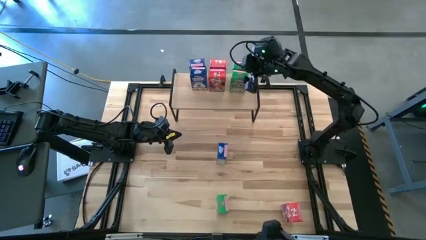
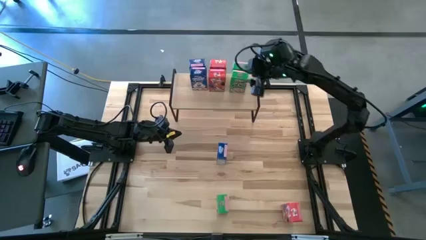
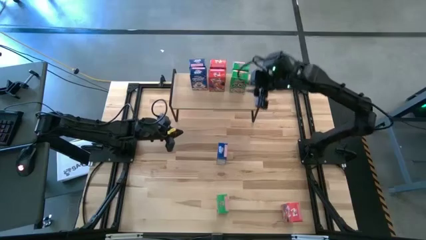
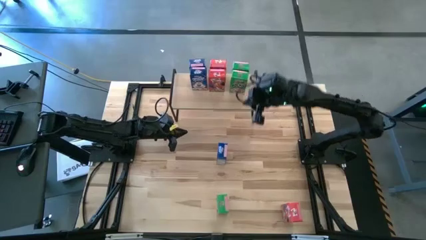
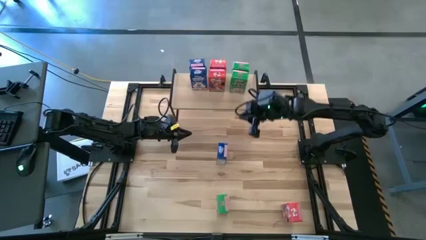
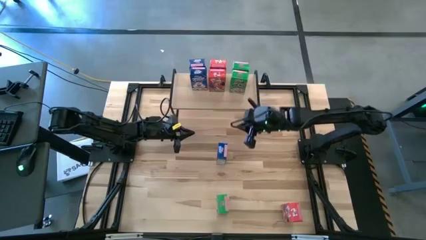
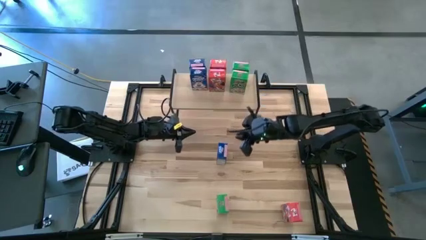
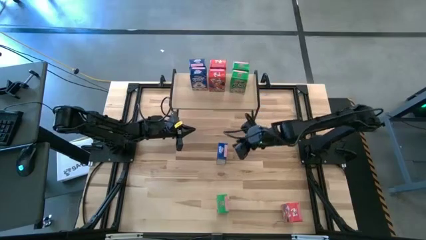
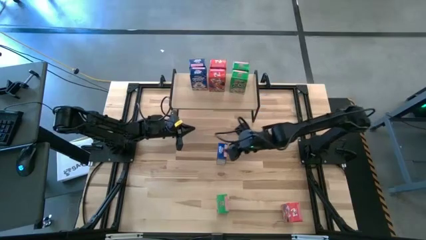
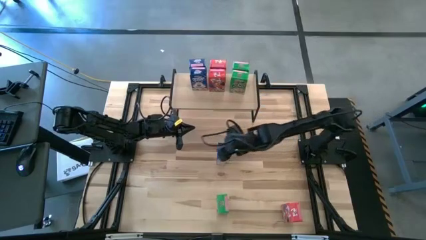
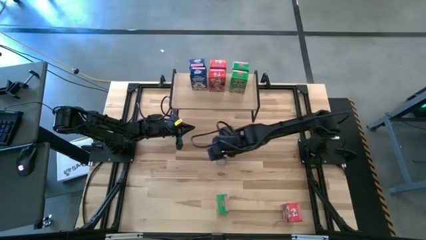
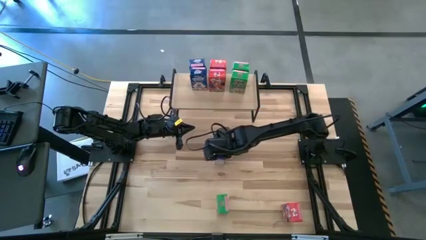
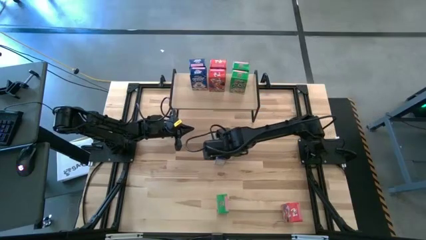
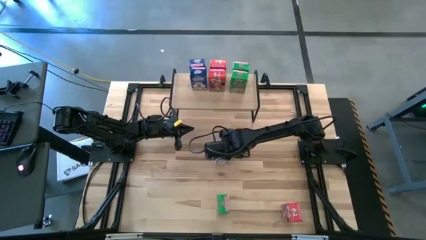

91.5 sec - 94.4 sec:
Task: Stack cereal on shelf
Put the blue cereal box aligned with the other blue cereal box on the shelf

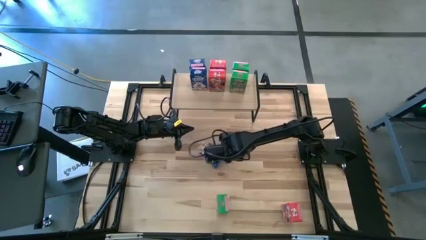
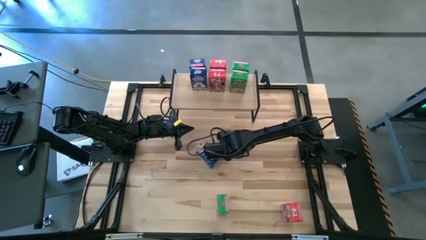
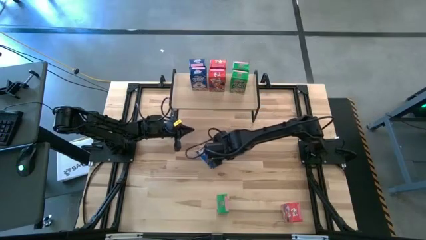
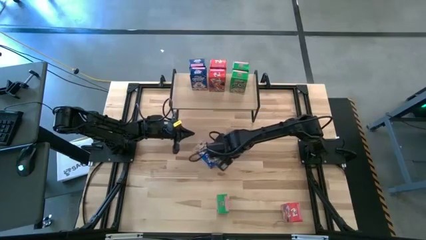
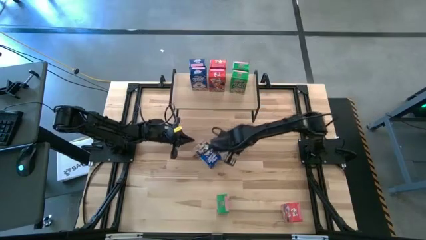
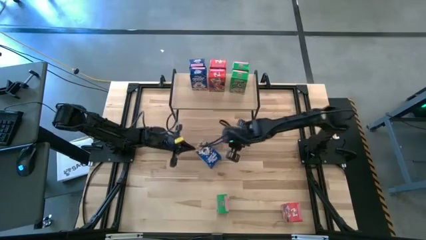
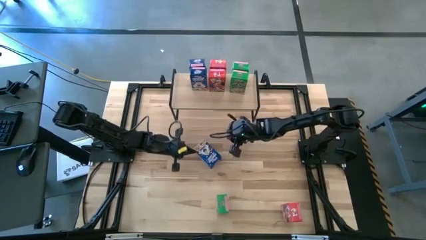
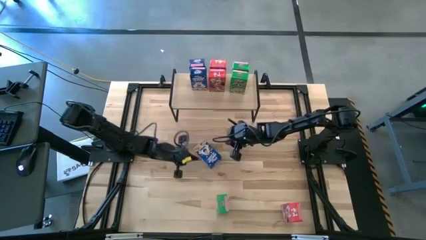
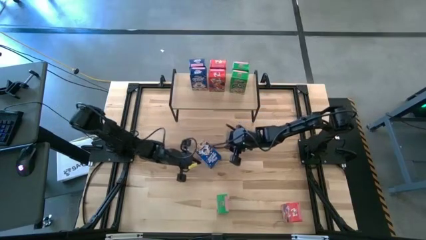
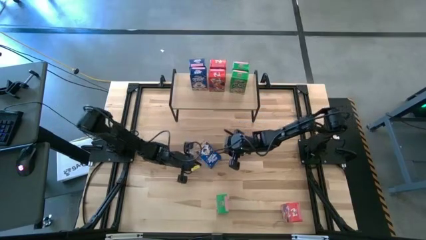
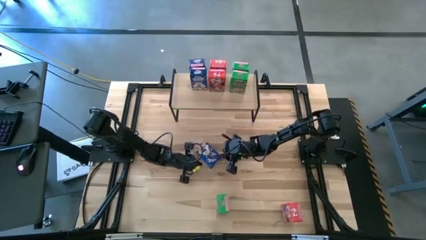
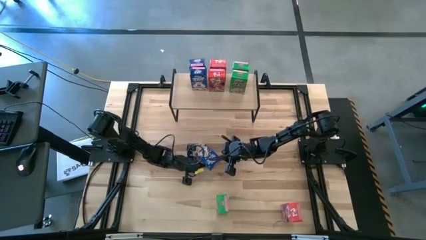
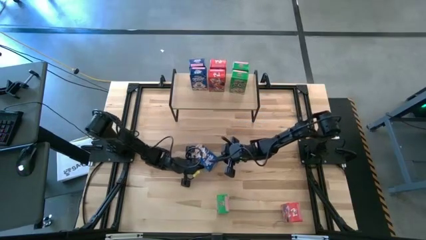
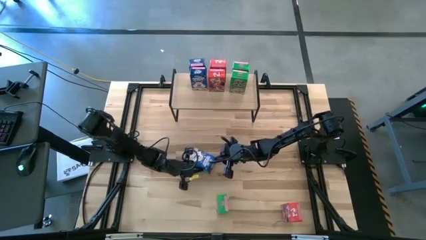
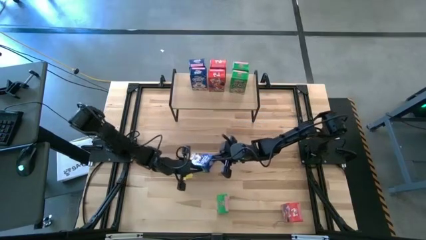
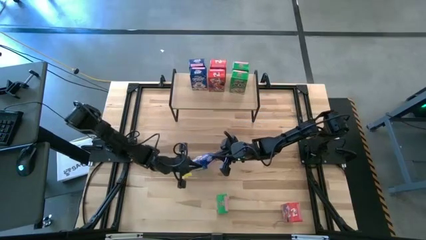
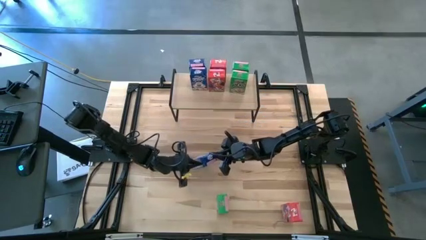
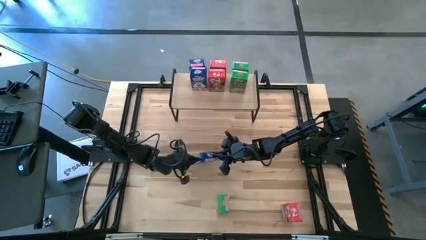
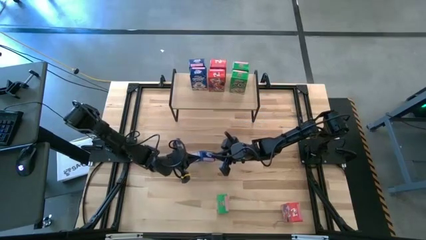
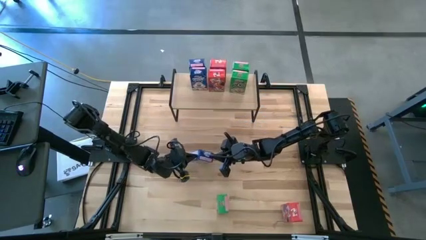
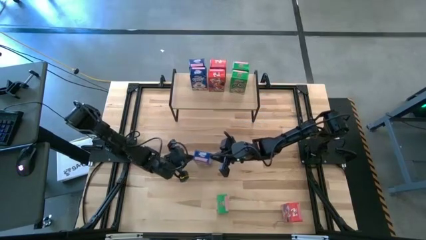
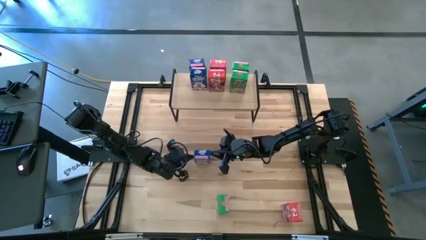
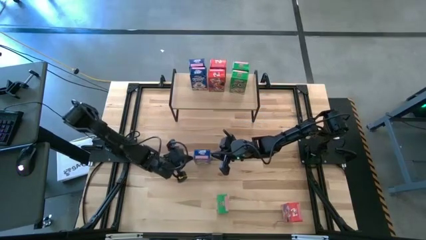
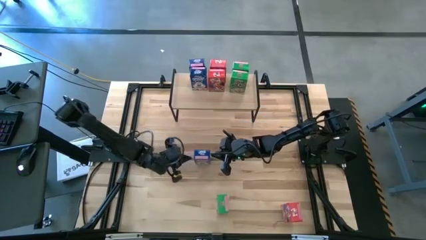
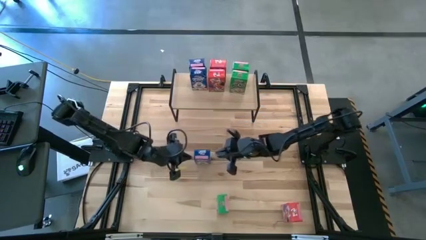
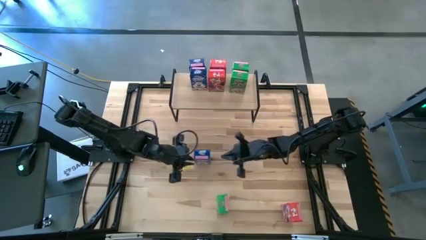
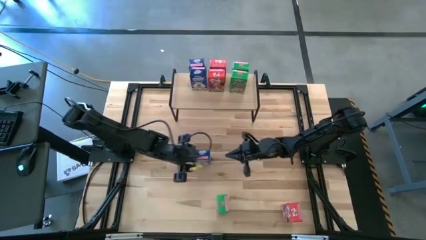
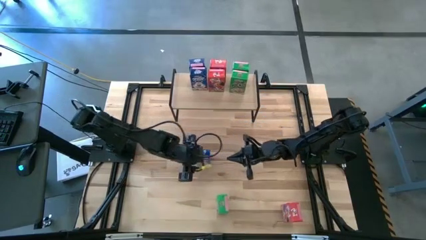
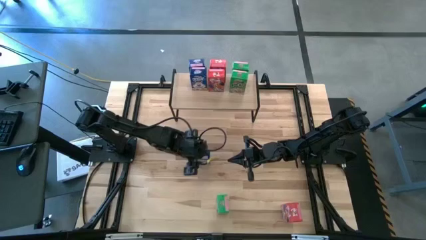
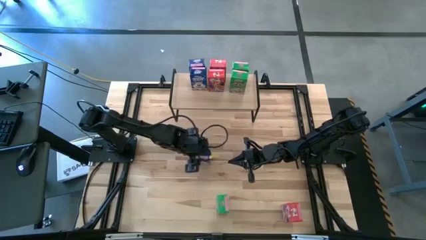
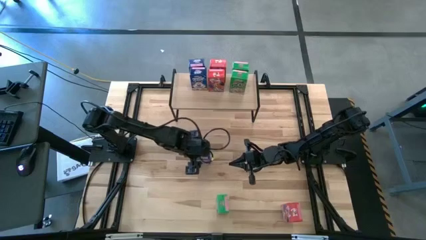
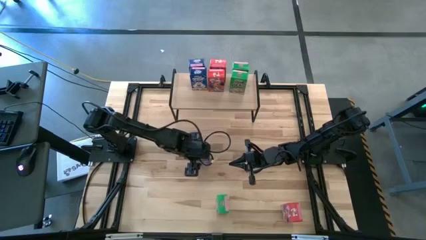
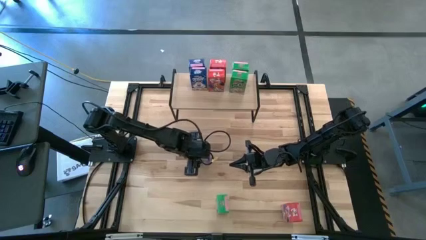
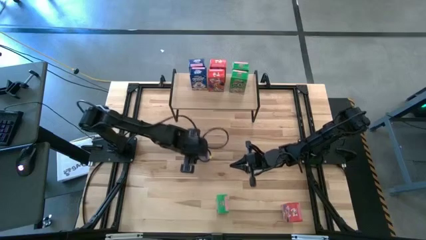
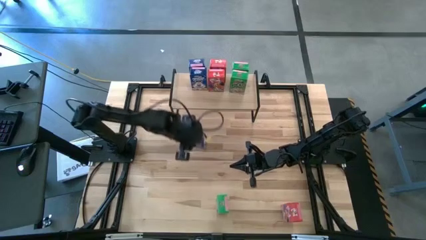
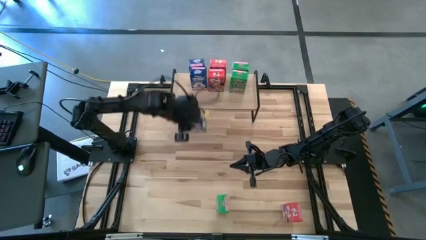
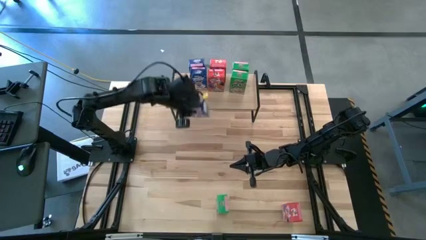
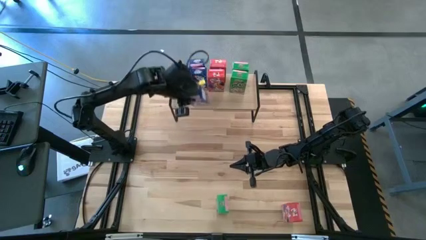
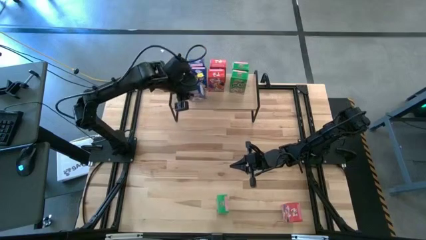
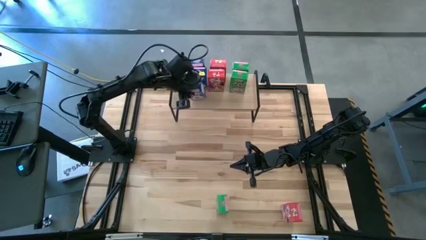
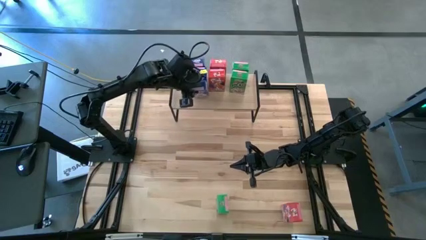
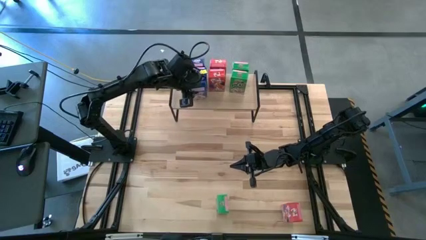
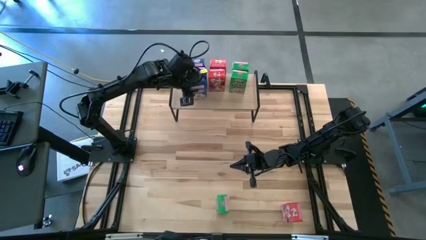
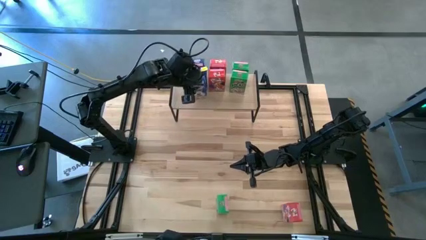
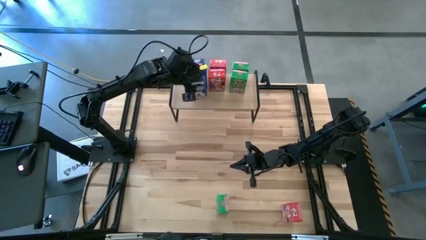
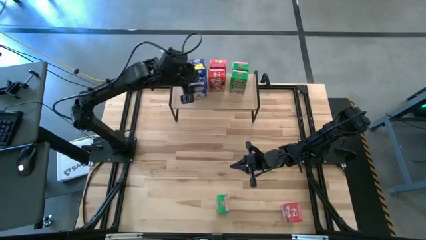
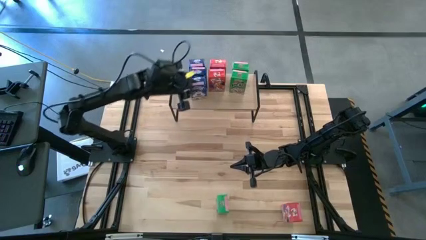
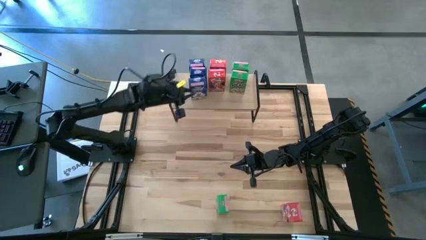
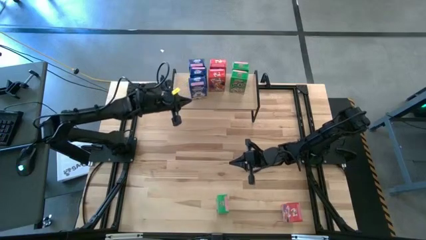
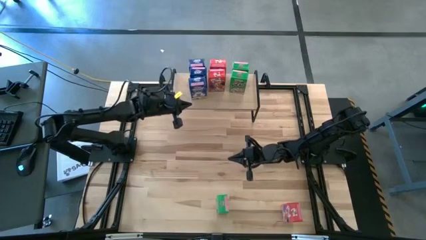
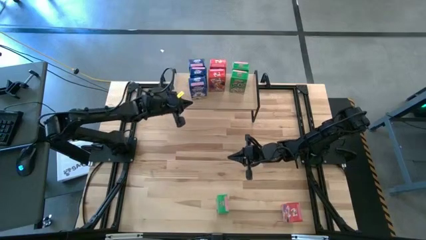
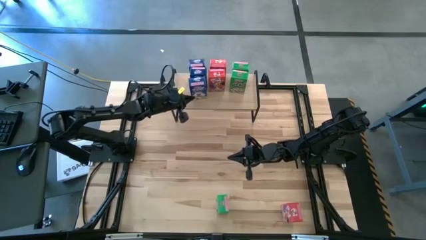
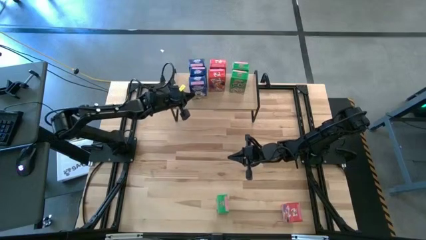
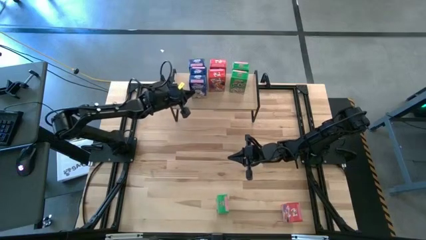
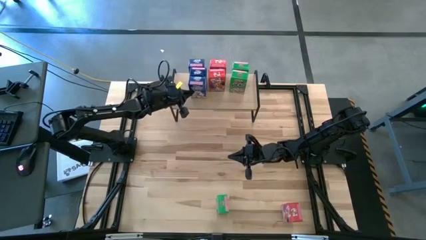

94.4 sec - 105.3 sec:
Put the blue cereal box aligned with the other blue cereal box on the shelf
